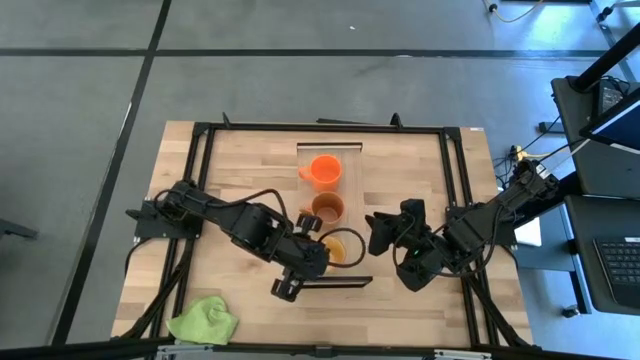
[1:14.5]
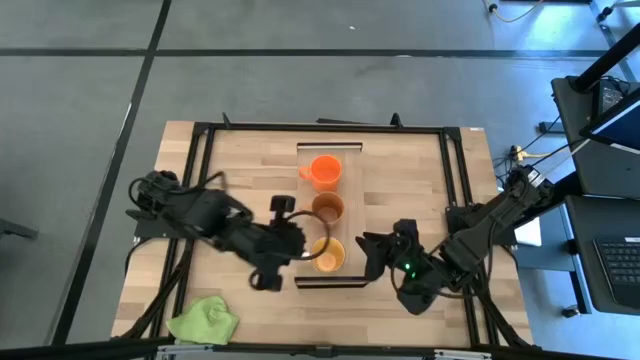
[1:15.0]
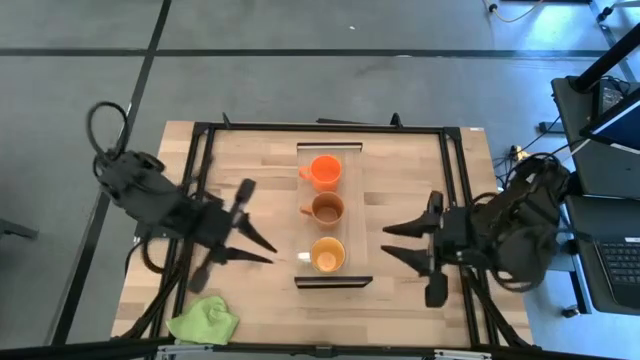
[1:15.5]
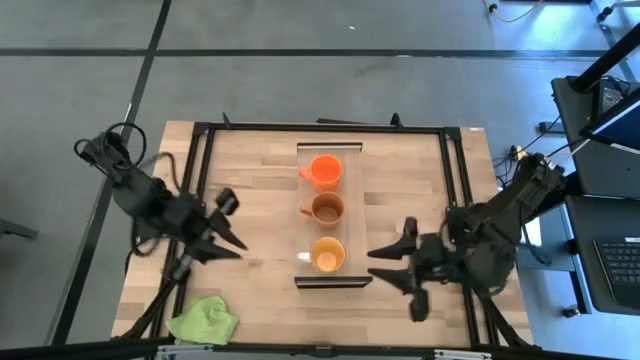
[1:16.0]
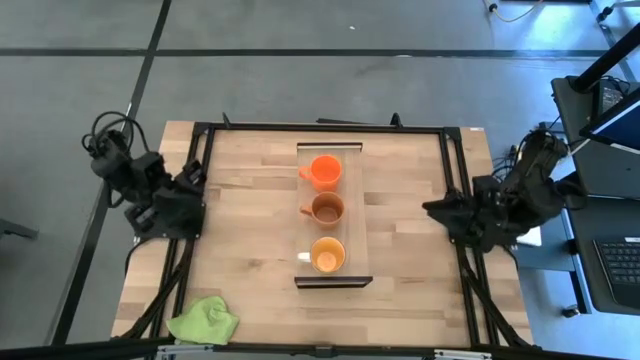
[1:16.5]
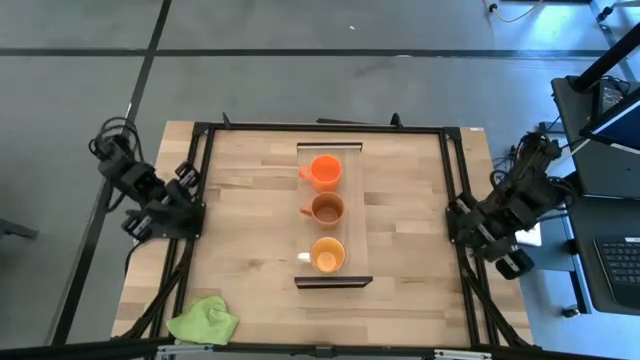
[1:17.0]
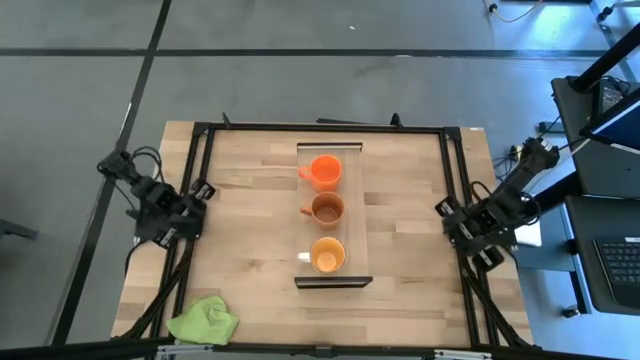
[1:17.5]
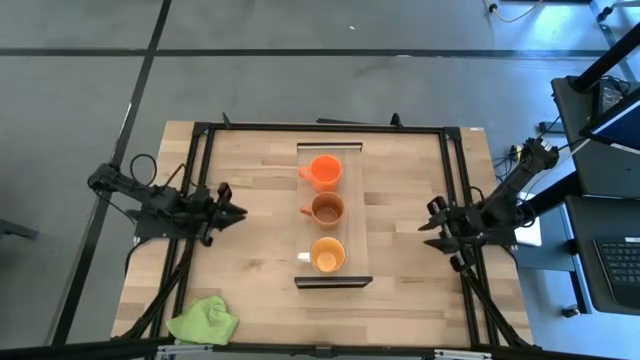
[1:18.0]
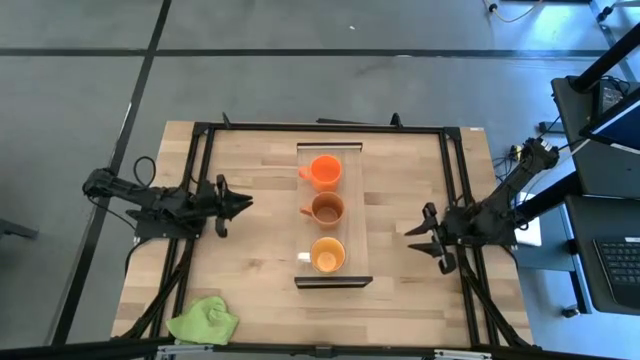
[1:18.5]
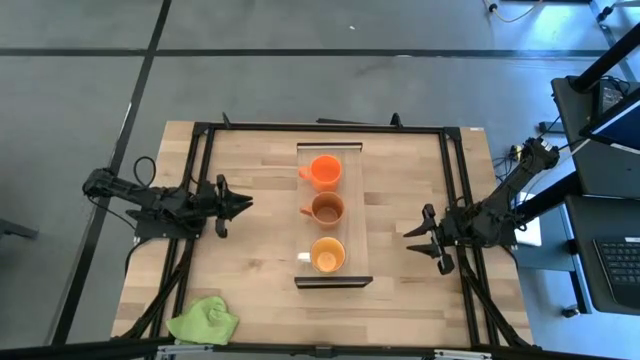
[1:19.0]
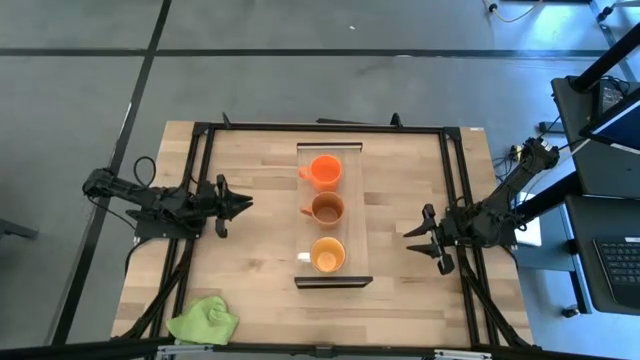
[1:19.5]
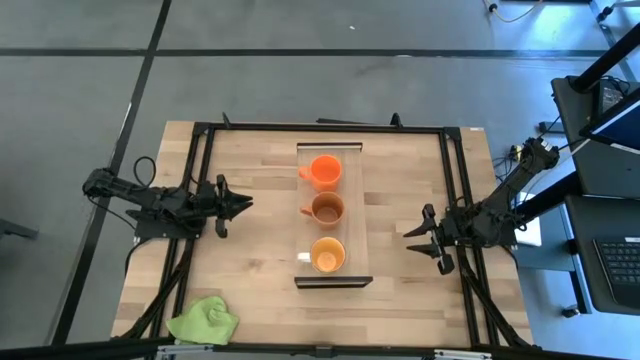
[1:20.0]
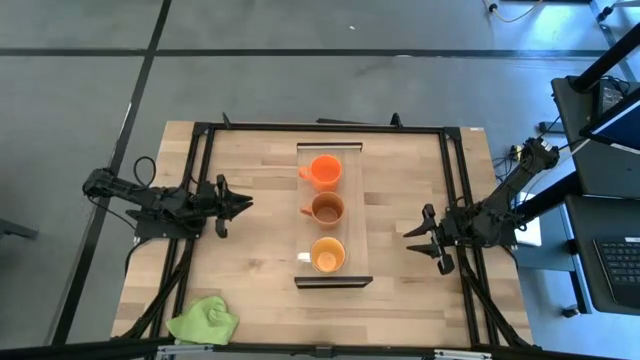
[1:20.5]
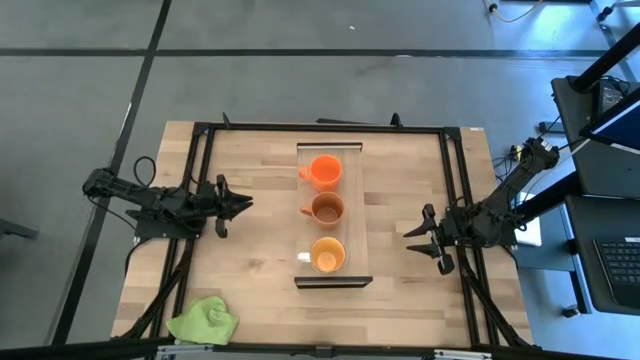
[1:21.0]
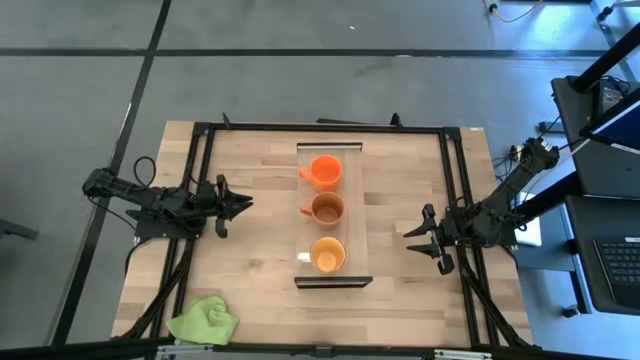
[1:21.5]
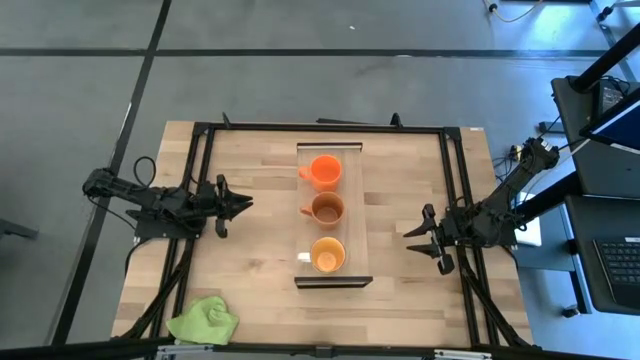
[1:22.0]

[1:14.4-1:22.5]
Task: Stack small to large cups/mugs on shelf
Return to Home Position

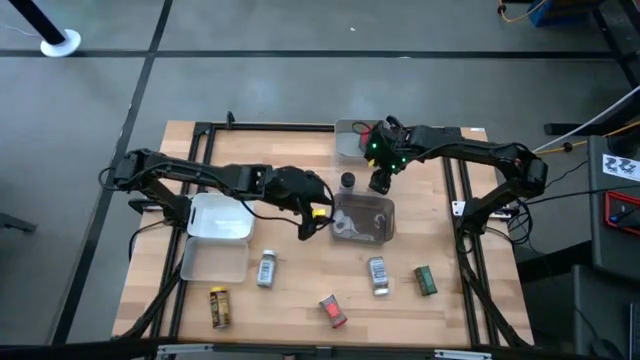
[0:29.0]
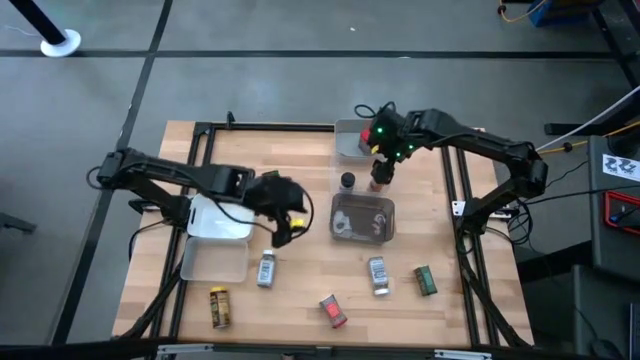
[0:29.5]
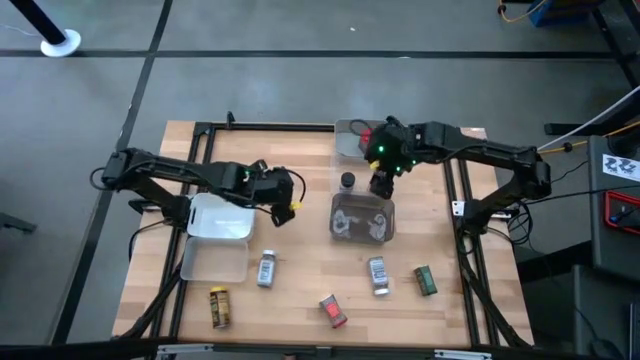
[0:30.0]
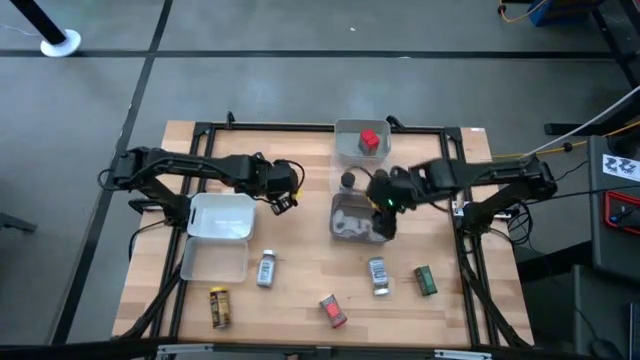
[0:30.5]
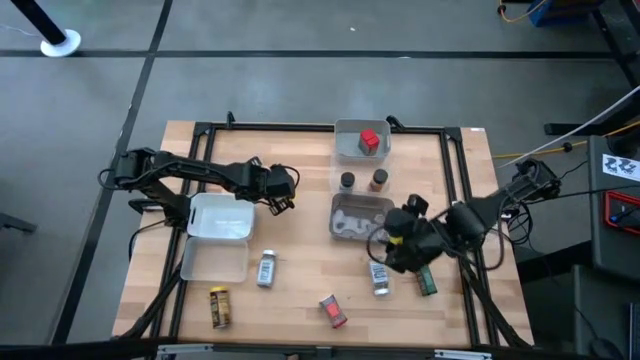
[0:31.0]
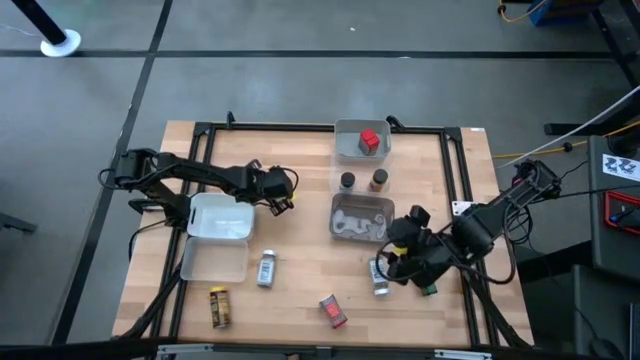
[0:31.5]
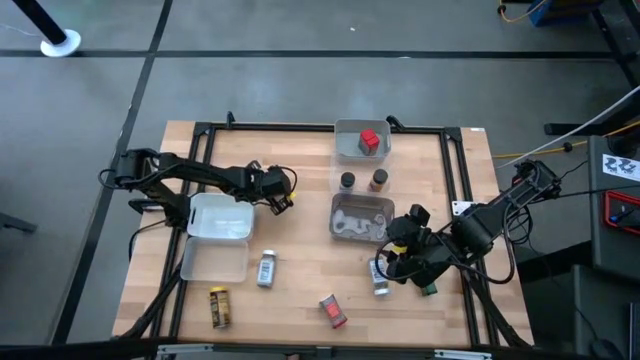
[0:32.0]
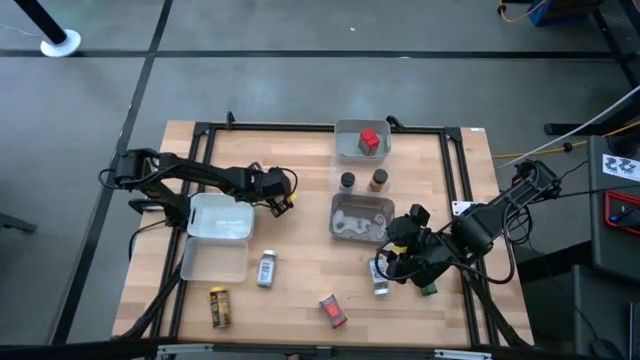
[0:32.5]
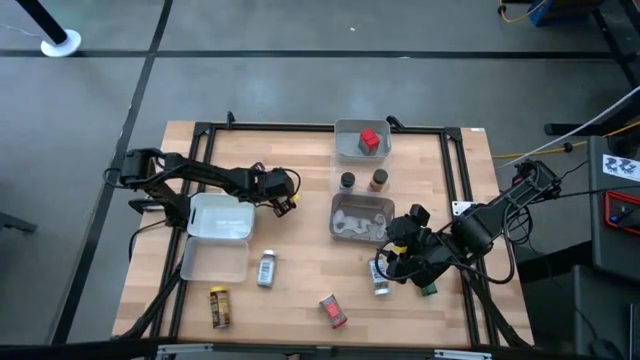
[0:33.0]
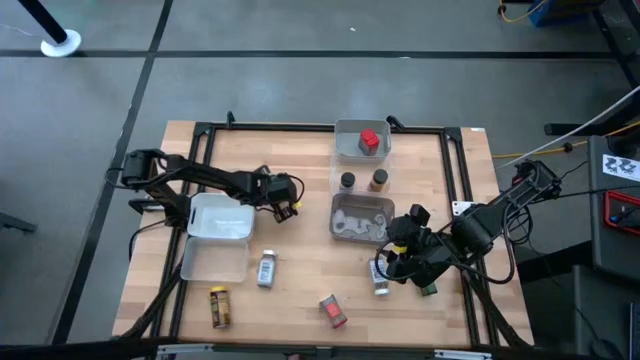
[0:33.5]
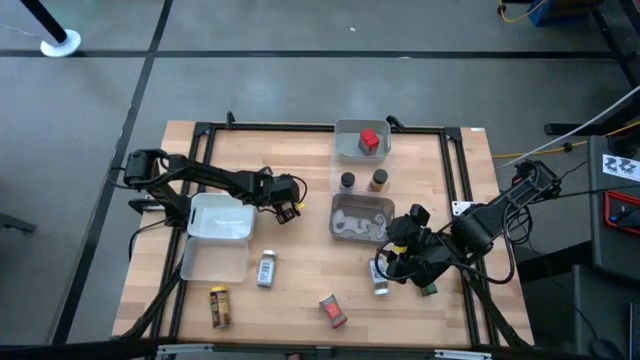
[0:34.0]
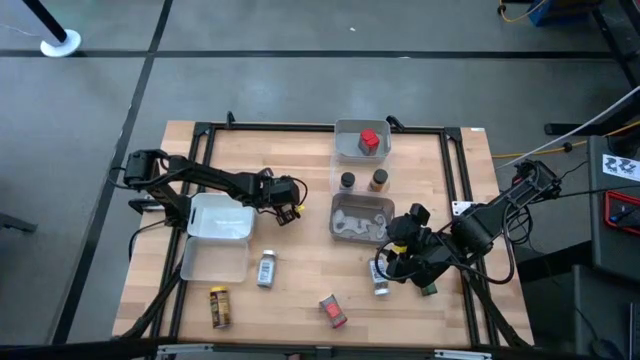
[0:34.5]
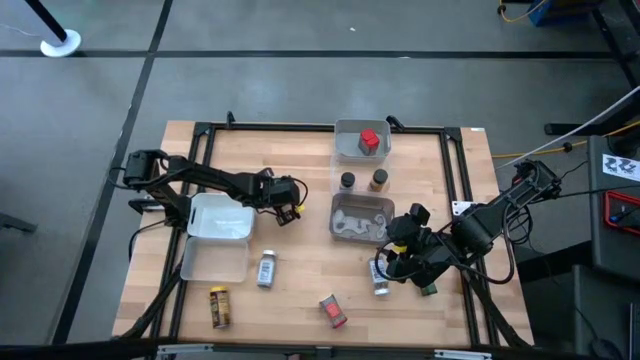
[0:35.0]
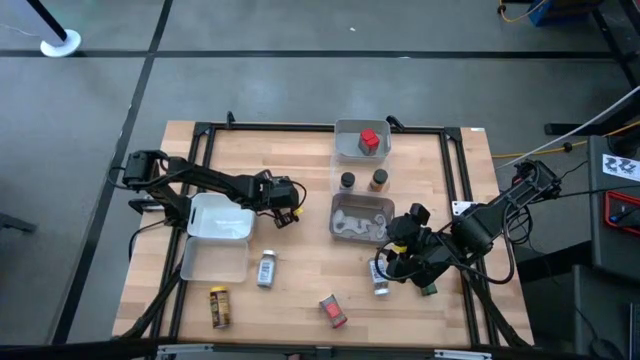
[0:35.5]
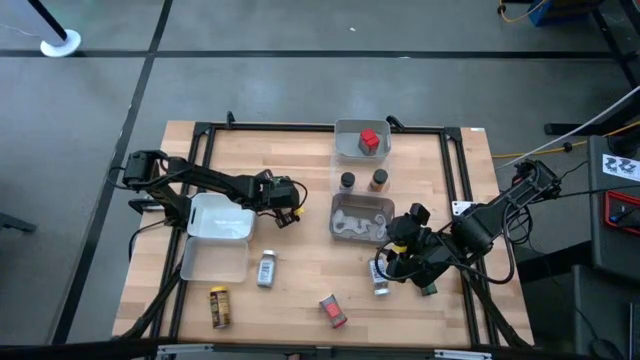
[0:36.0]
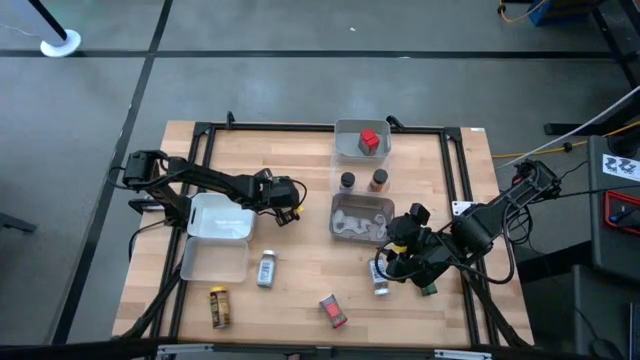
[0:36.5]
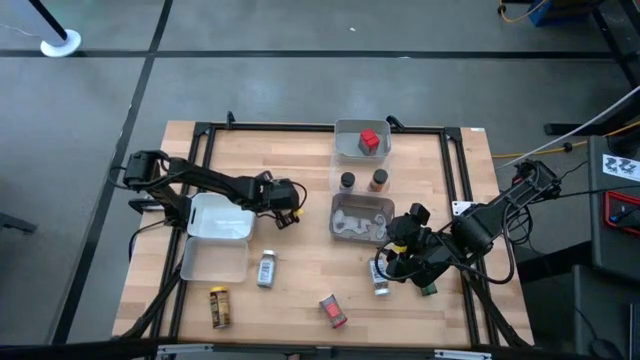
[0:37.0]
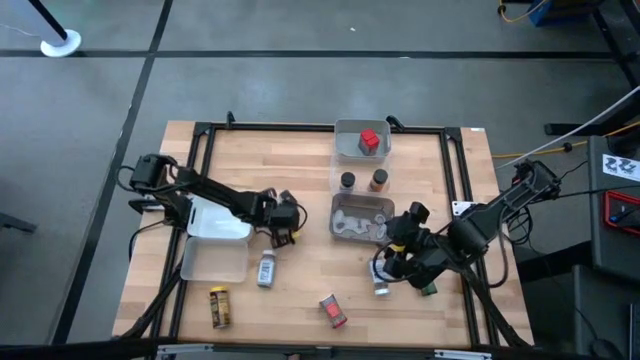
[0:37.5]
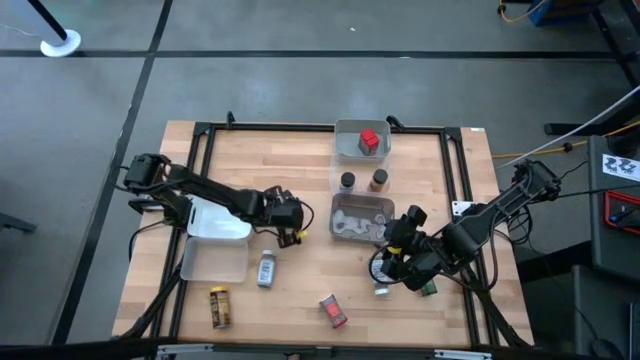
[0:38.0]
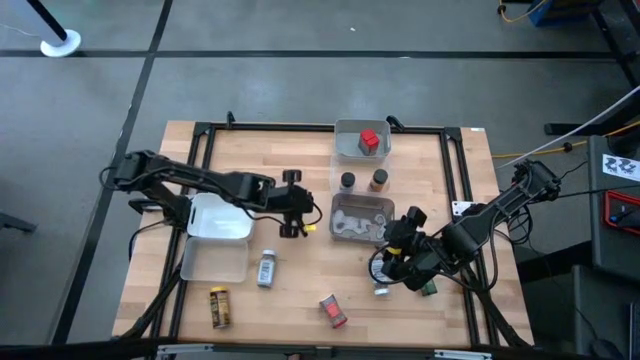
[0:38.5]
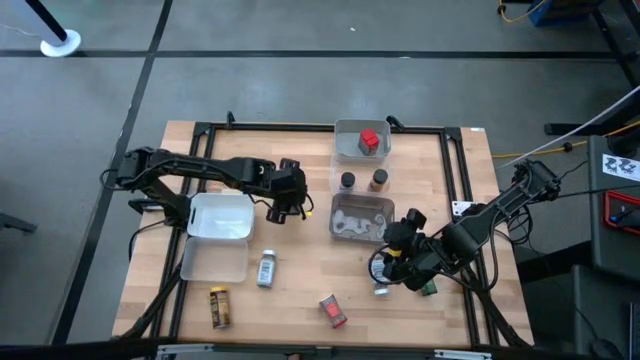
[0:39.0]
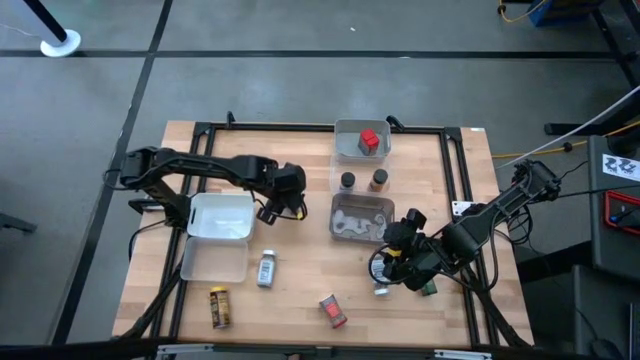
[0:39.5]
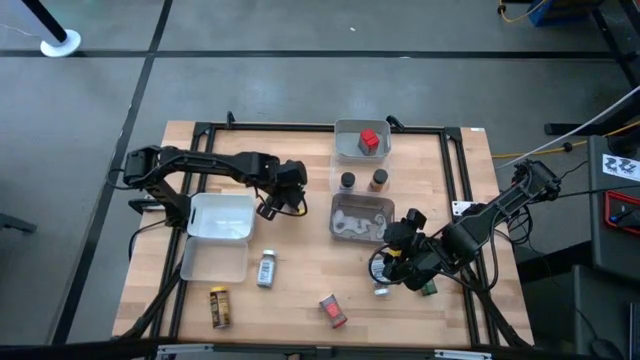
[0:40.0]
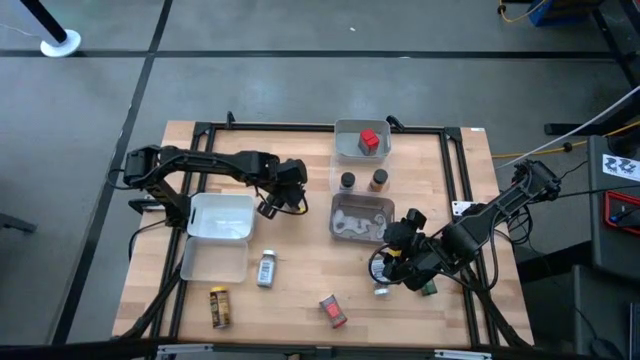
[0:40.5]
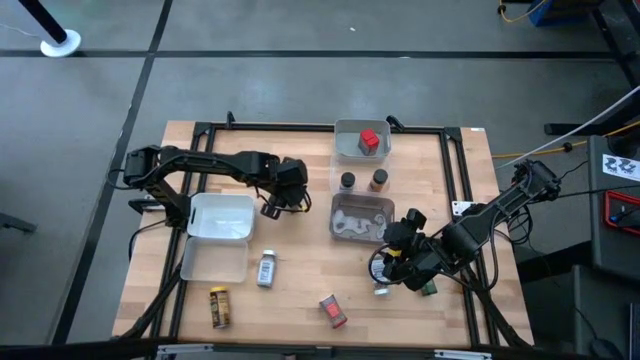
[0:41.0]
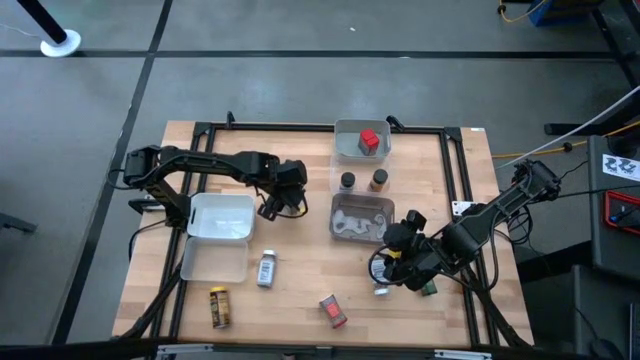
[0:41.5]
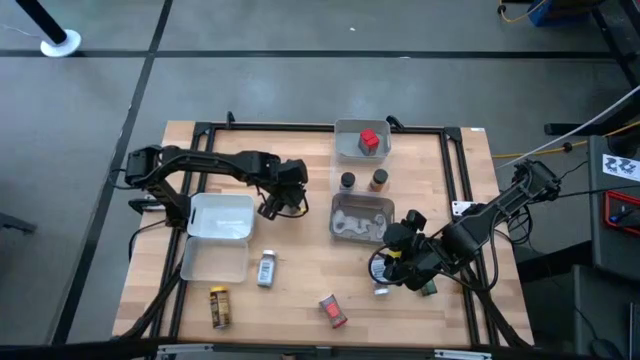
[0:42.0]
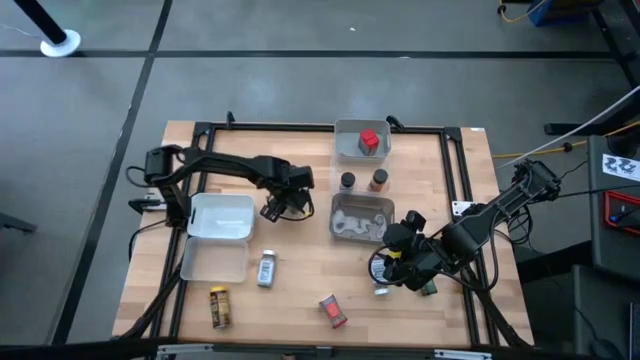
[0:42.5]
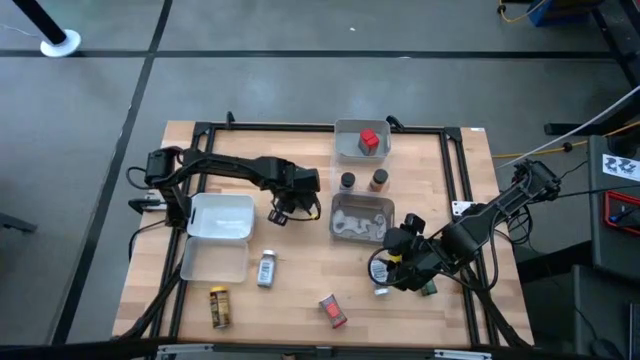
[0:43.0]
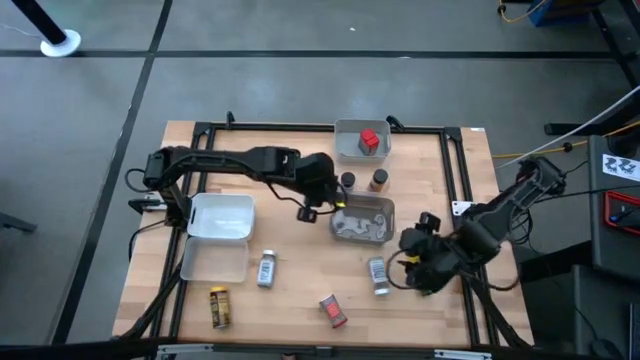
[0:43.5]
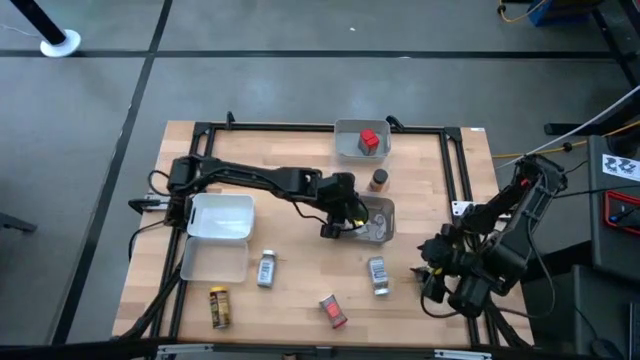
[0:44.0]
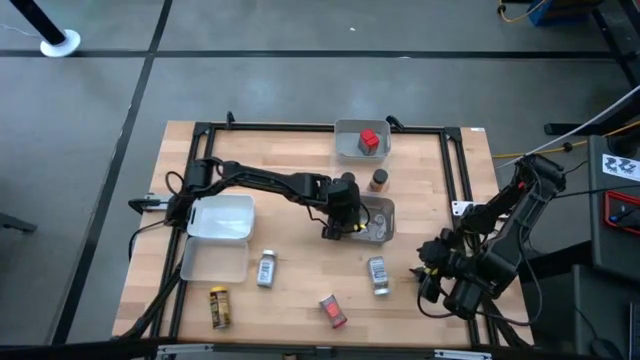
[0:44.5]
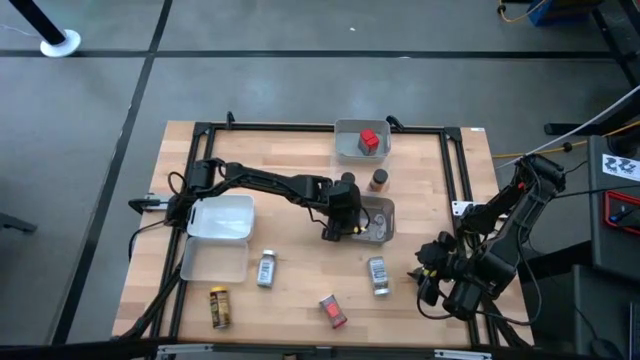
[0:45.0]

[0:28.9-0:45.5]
Task: Sort spices by type
Put the top black seasoning can into the black bin
